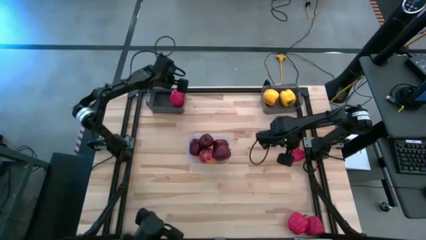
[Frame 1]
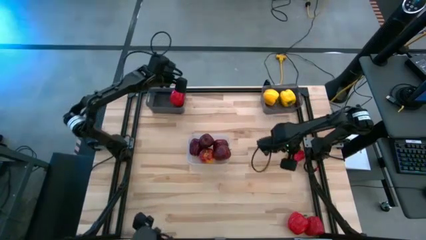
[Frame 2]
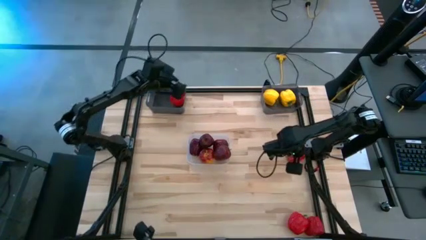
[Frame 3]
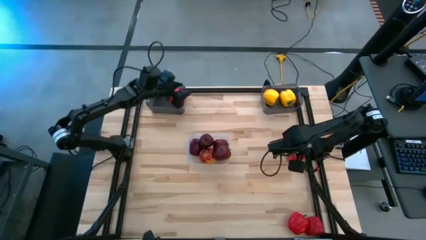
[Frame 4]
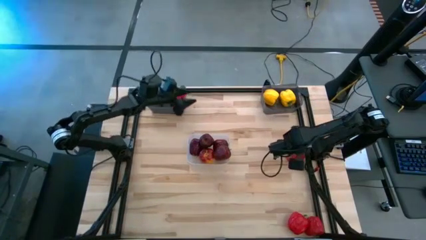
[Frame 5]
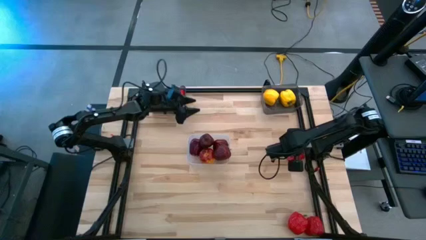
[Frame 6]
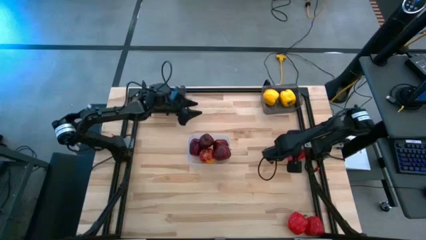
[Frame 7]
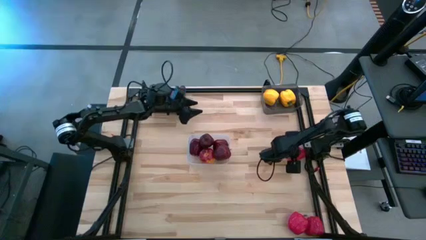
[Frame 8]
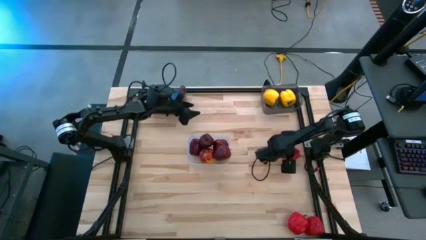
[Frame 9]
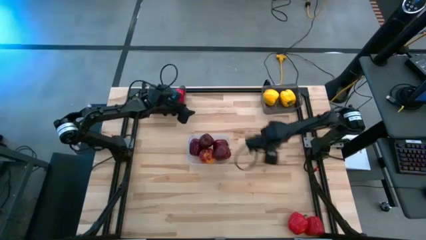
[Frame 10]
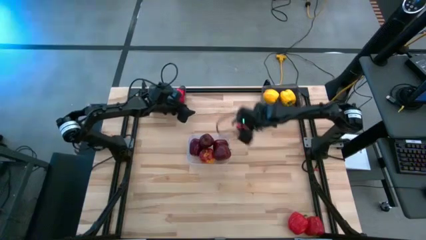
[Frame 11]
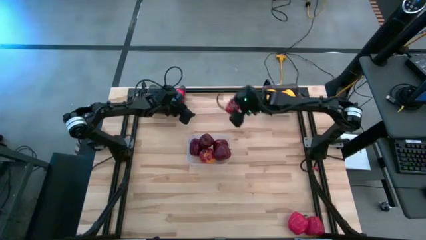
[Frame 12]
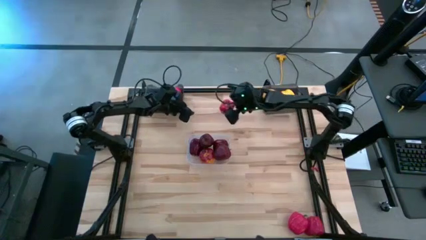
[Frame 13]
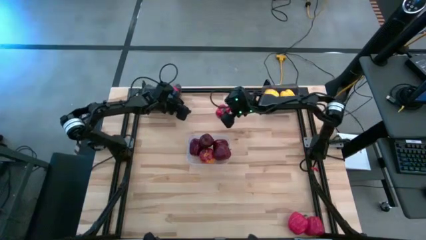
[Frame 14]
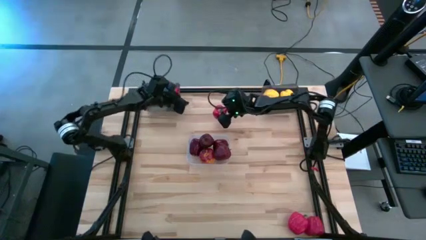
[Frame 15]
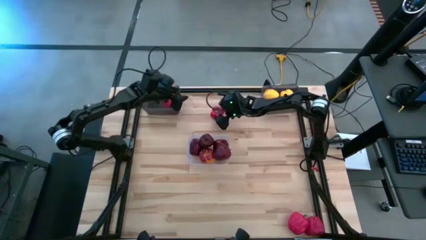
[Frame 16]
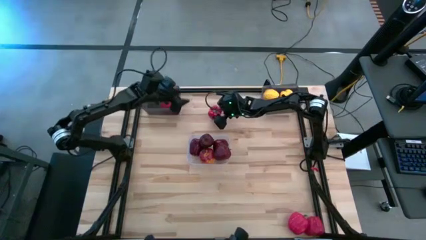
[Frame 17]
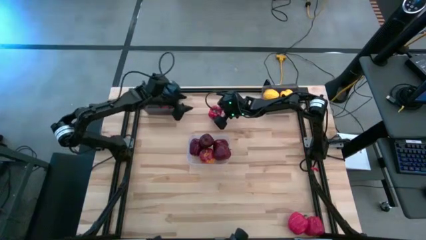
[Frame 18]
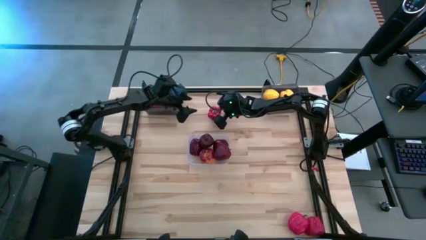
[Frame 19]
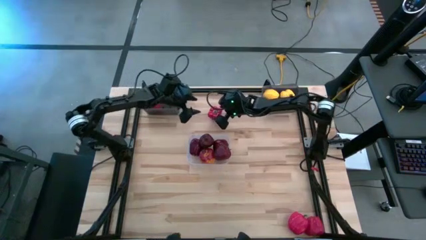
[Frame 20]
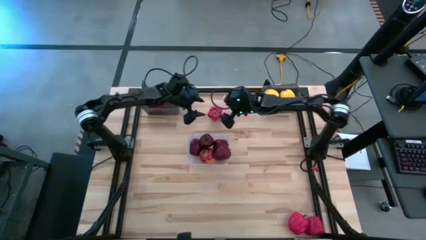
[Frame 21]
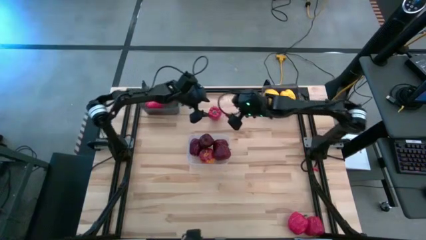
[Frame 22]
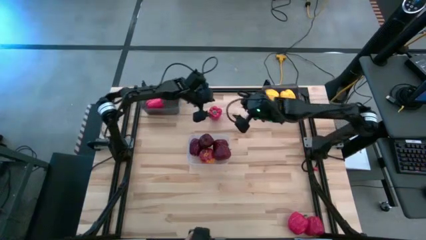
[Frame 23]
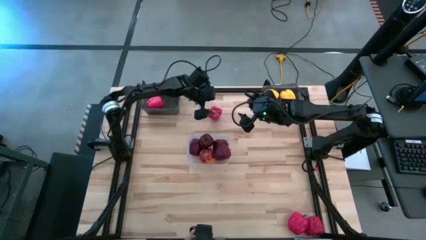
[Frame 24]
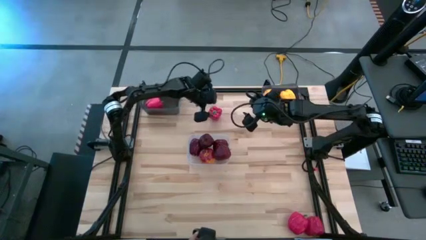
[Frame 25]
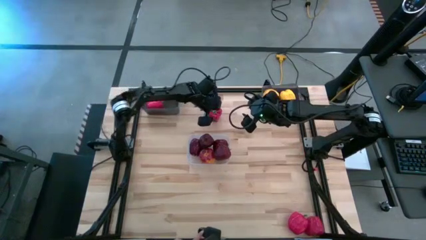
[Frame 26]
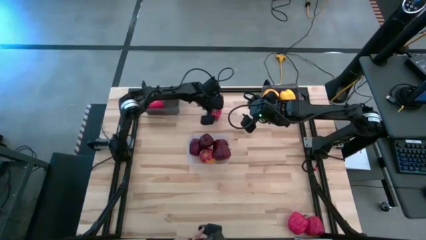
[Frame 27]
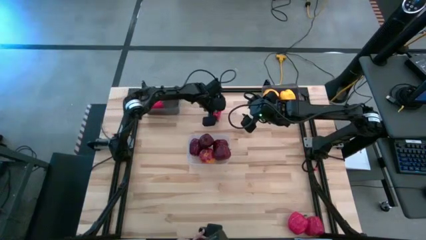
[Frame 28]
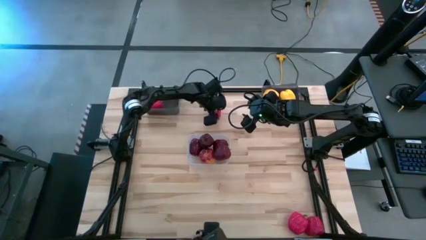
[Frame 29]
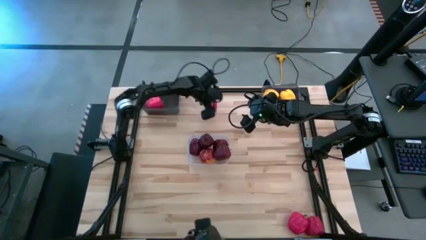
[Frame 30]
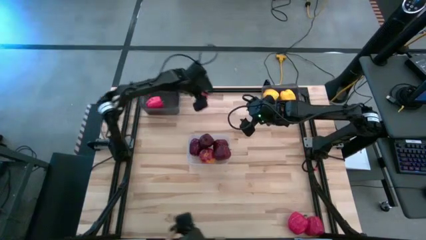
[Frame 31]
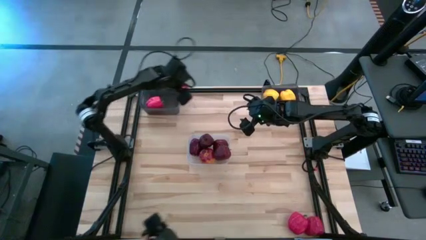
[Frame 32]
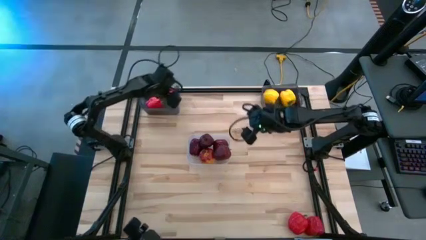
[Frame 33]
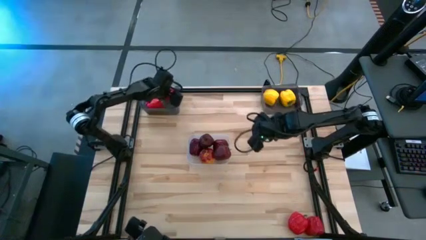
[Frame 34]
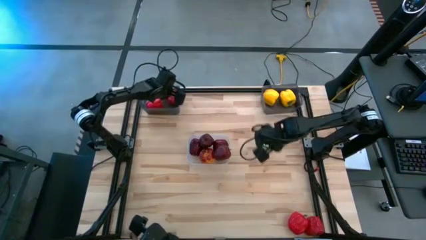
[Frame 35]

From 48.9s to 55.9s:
Task: Sort produce into baskets
Put the red bell pepper into the left black bin

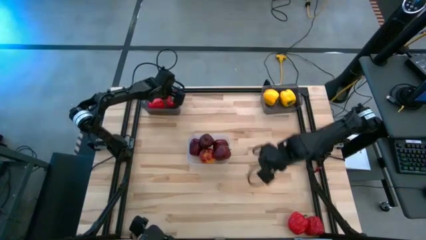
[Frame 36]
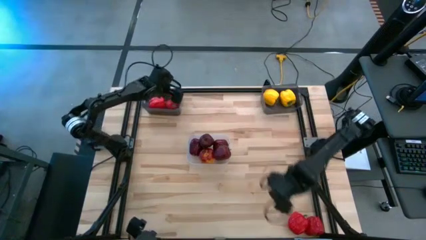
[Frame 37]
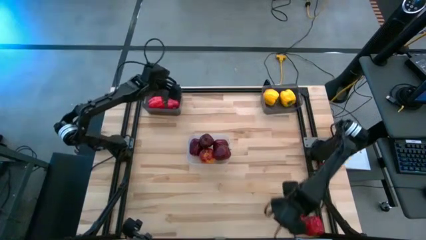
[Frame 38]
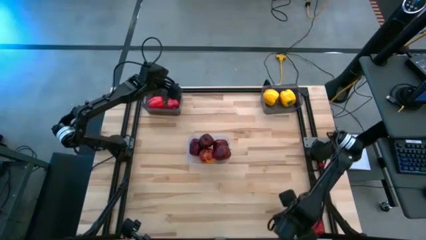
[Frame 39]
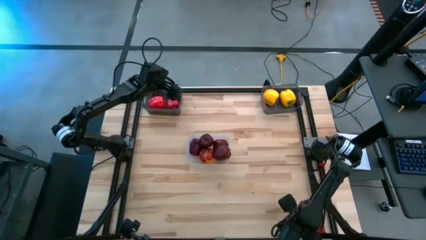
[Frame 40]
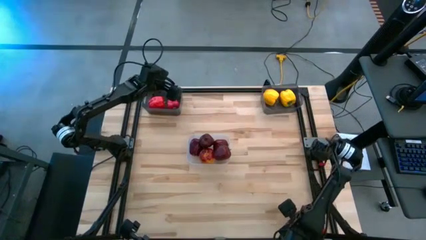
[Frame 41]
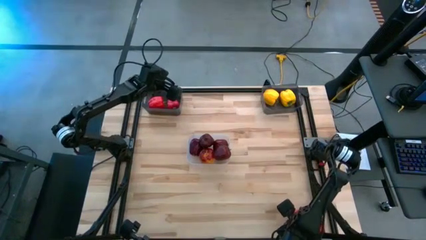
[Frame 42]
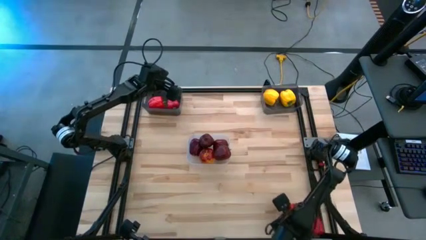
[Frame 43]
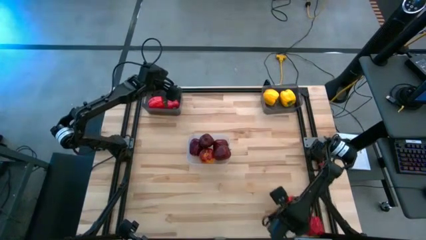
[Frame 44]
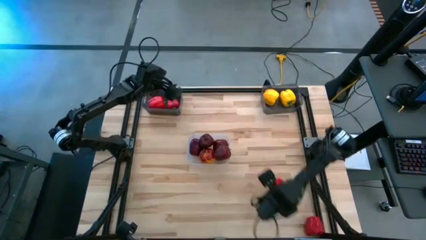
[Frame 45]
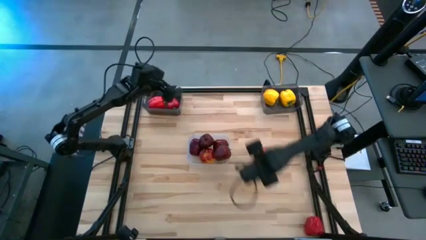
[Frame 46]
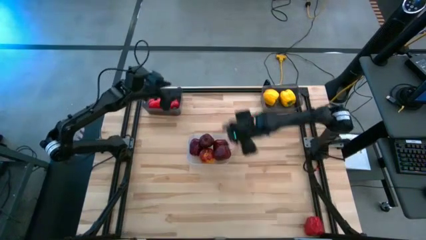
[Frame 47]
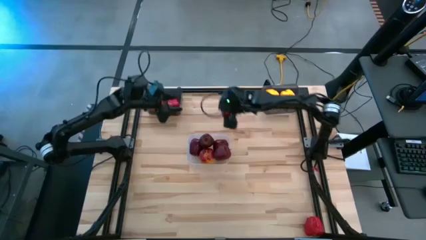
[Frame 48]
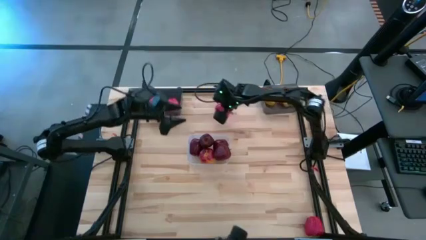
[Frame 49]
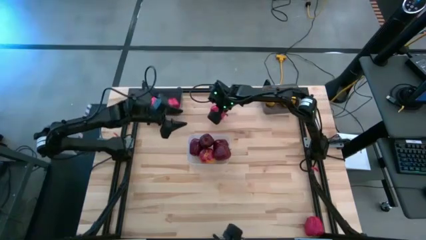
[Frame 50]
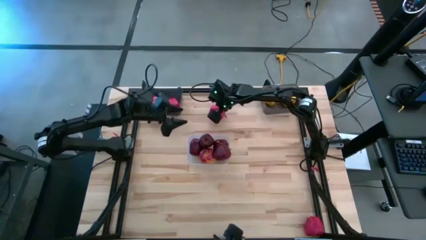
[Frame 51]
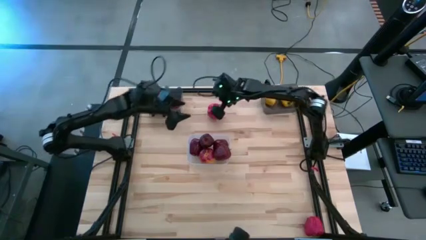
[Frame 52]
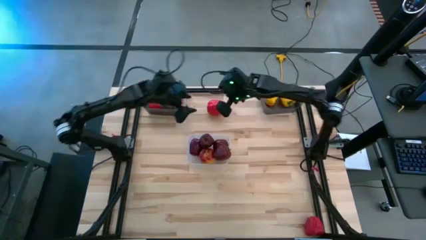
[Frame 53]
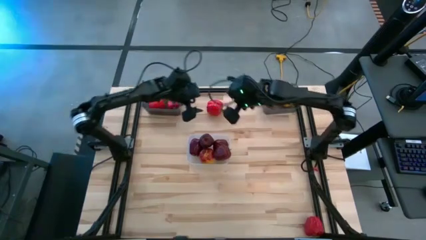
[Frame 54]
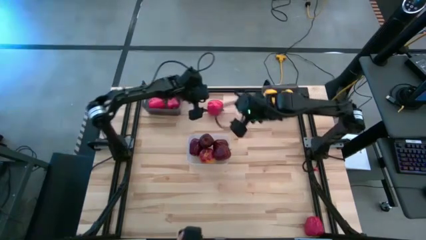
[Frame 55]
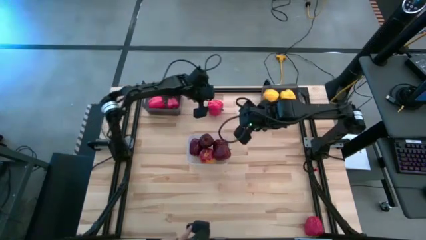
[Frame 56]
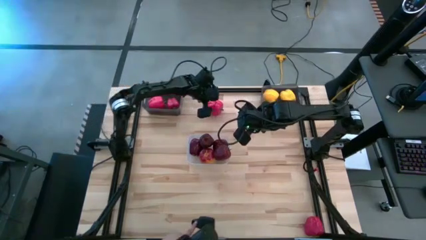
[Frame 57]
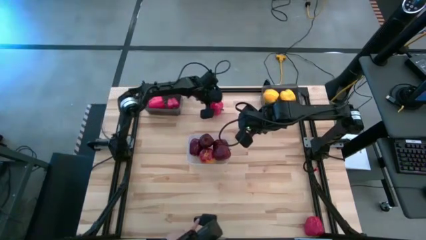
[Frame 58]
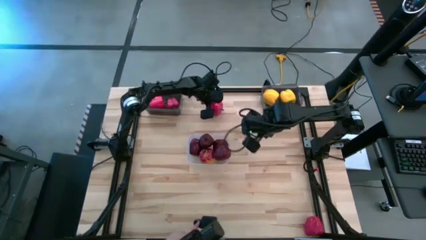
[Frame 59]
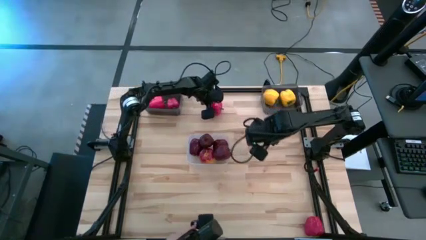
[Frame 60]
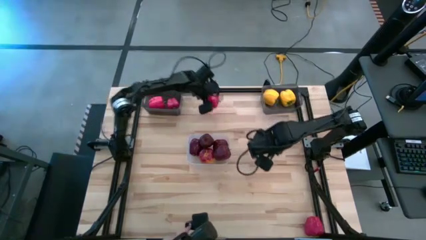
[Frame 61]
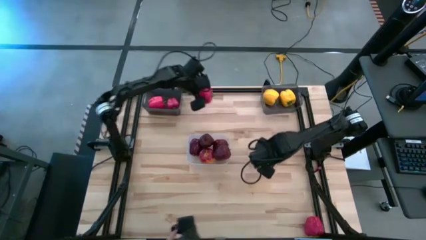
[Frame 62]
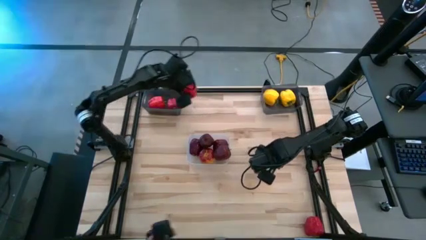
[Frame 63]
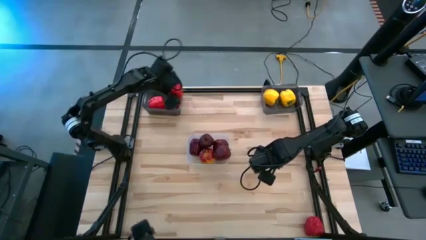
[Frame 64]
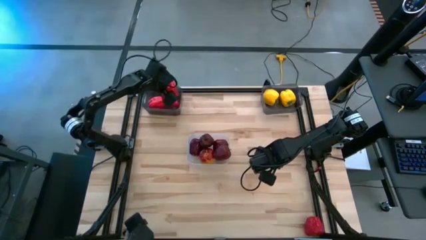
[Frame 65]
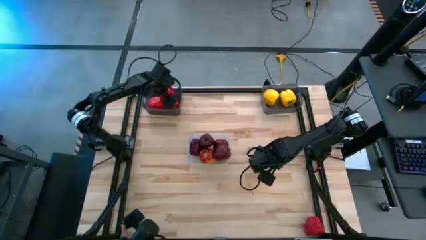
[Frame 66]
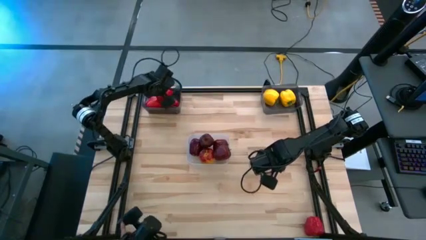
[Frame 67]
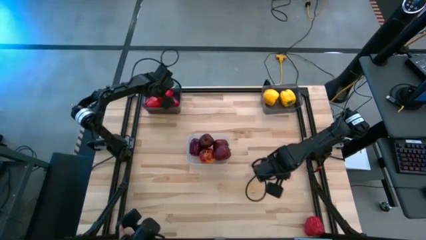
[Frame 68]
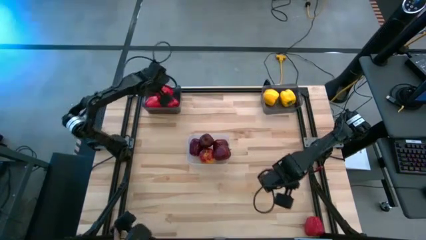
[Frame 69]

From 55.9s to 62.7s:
Put the red bell pepper into the left black bin

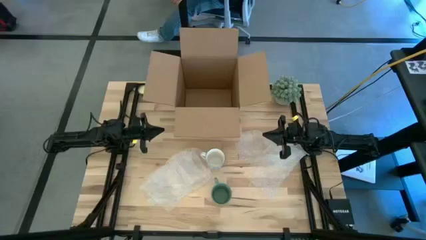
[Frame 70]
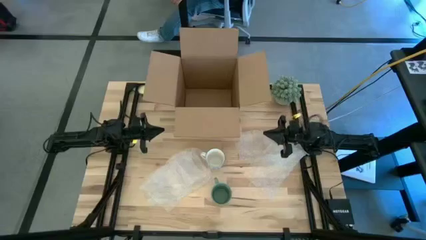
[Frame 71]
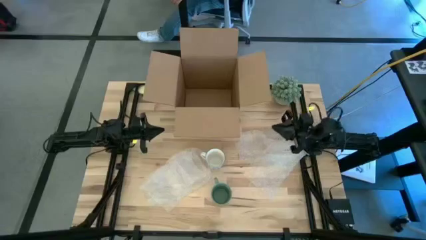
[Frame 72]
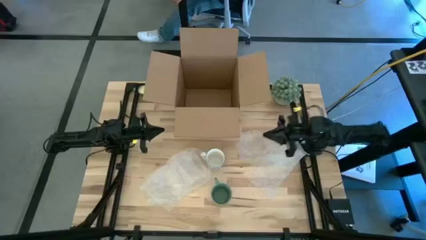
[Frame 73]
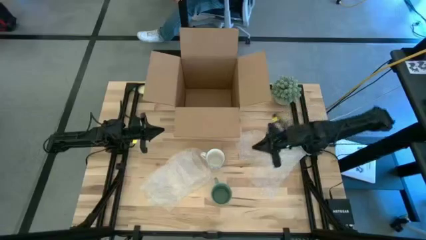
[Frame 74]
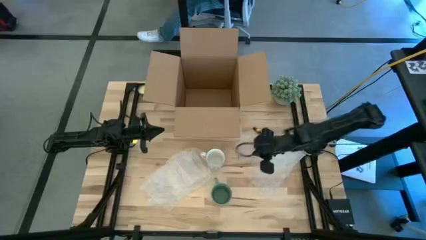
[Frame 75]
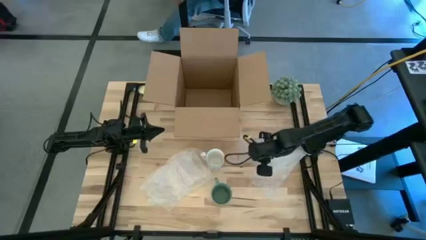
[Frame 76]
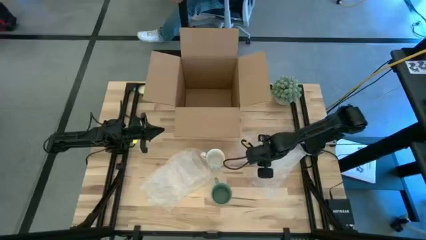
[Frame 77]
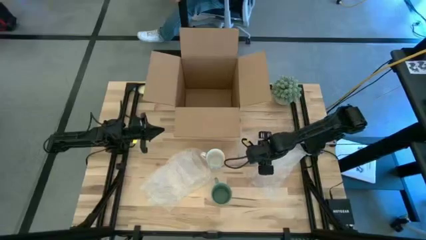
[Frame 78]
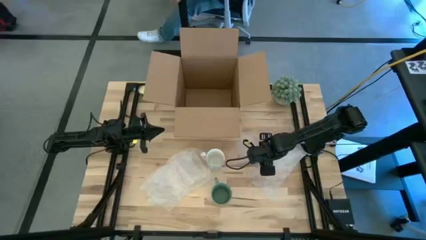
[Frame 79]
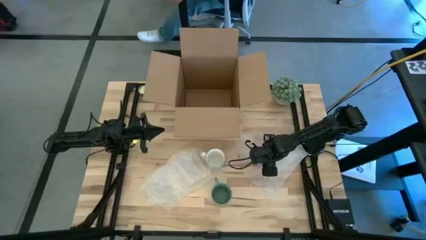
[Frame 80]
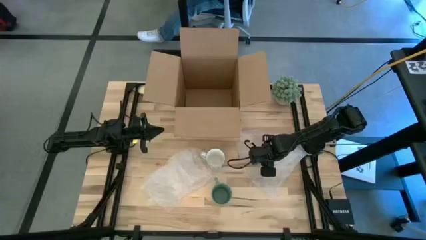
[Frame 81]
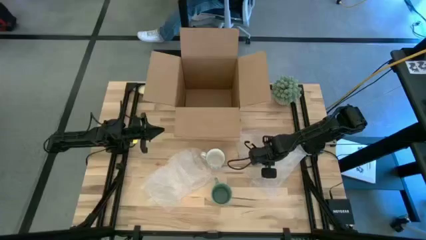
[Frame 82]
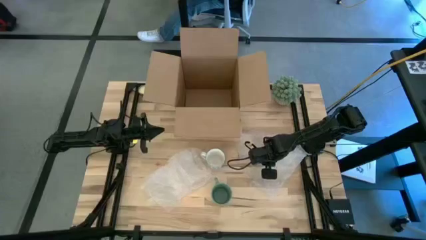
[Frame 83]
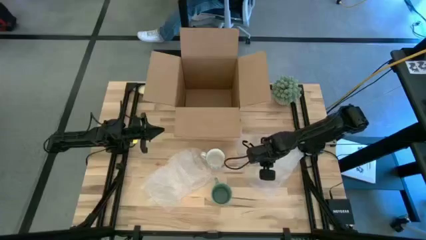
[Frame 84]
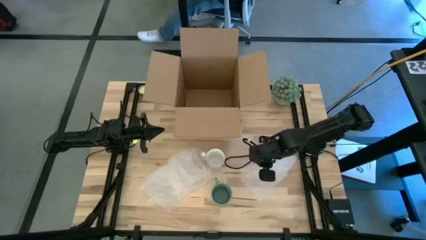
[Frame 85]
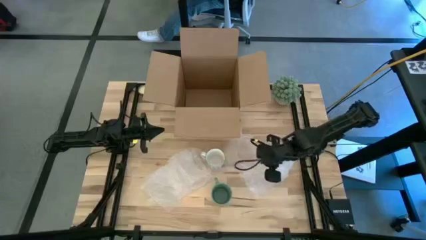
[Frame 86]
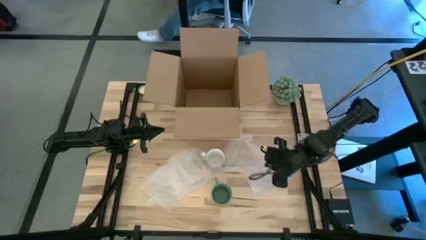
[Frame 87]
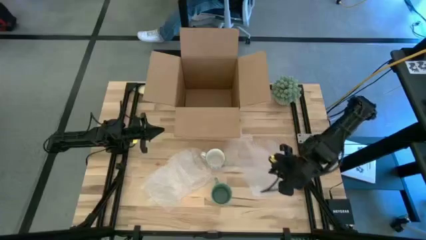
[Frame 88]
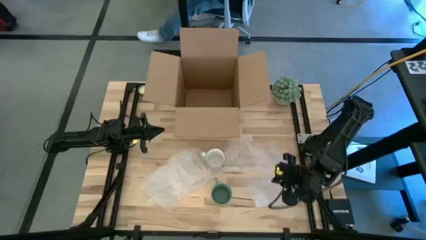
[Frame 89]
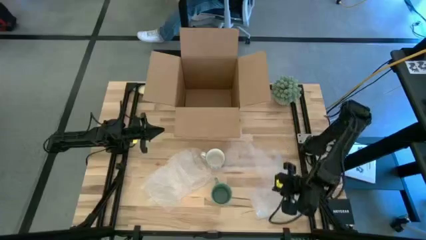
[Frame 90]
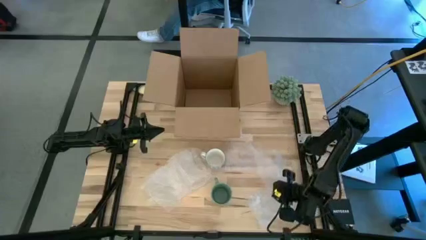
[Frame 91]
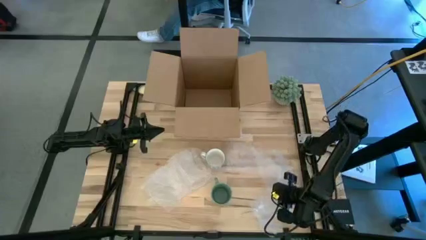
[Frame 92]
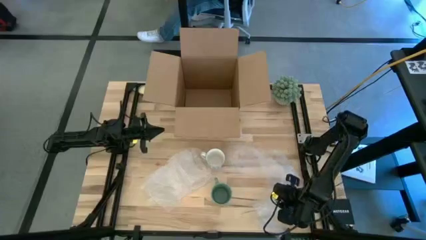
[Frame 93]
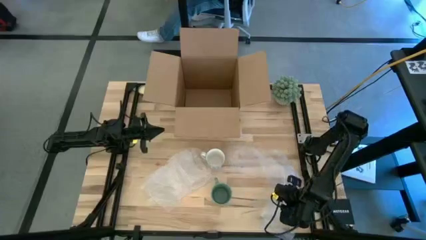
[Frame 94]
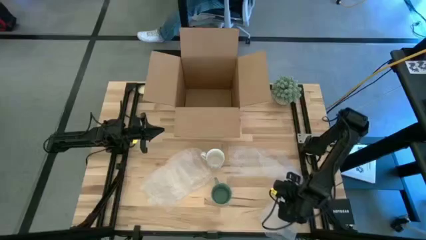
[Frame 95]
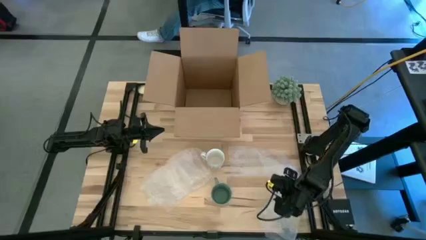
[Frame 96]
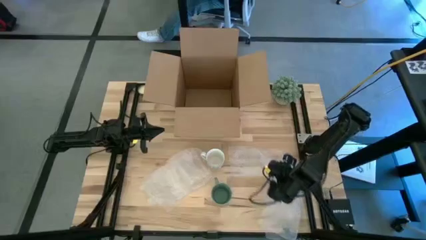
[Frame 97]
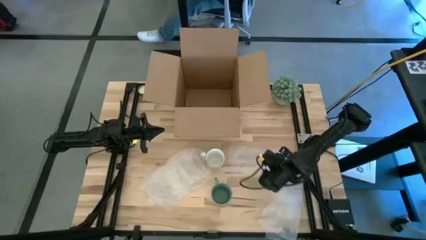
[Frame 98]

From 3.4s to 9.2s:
Task: wrap mug
Prepare the right transparent bubble wrap
